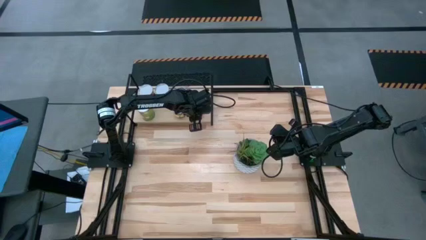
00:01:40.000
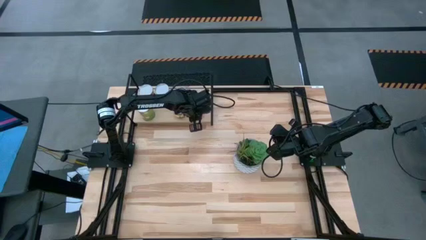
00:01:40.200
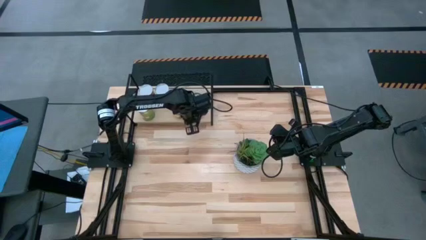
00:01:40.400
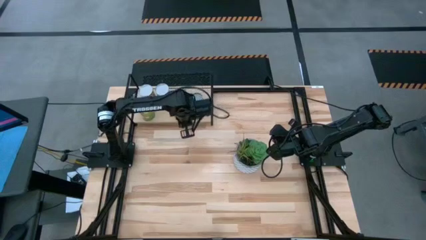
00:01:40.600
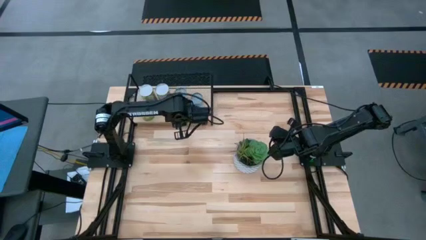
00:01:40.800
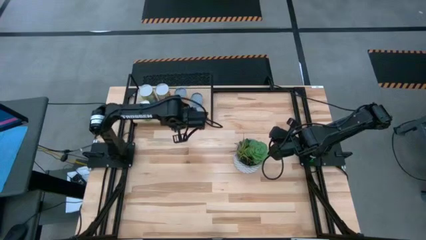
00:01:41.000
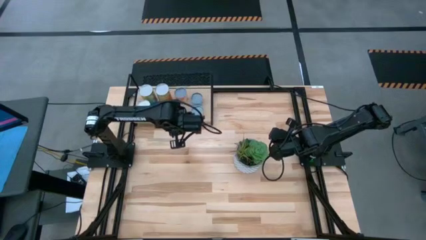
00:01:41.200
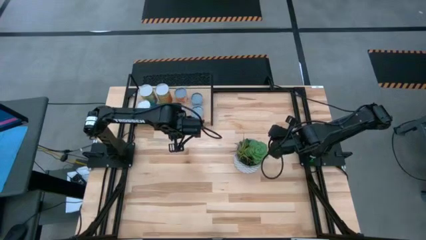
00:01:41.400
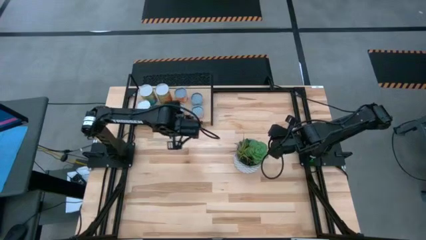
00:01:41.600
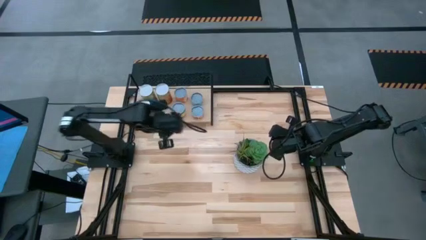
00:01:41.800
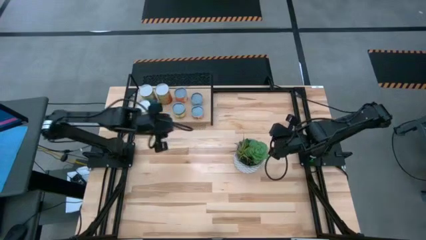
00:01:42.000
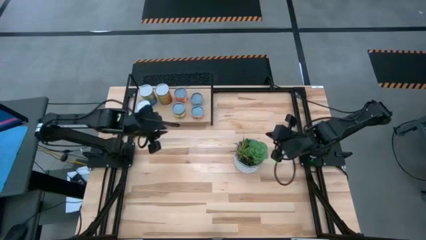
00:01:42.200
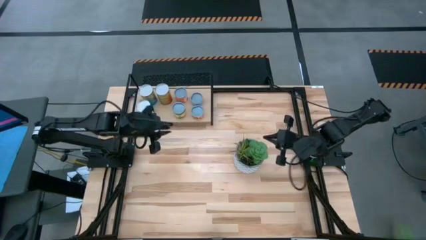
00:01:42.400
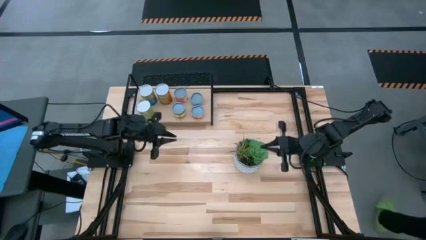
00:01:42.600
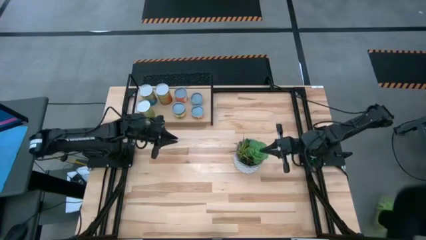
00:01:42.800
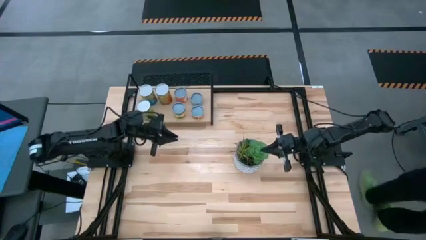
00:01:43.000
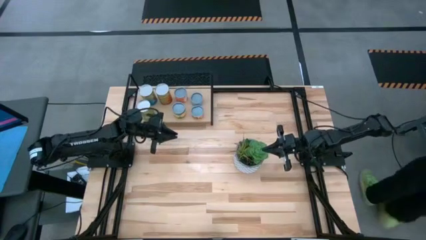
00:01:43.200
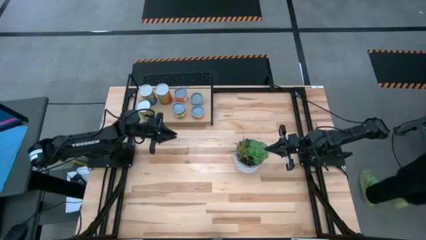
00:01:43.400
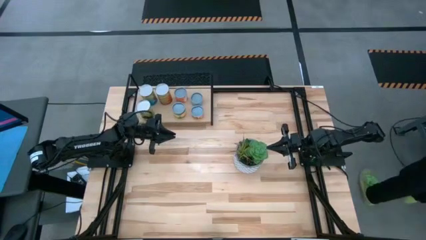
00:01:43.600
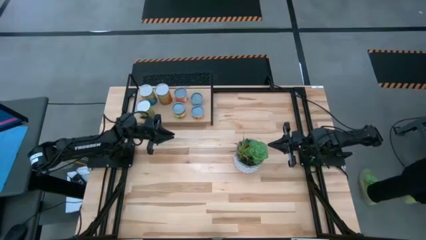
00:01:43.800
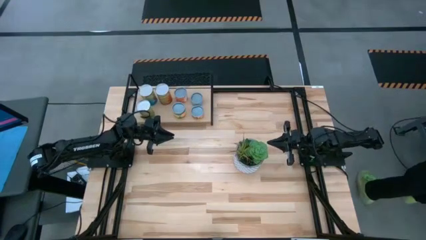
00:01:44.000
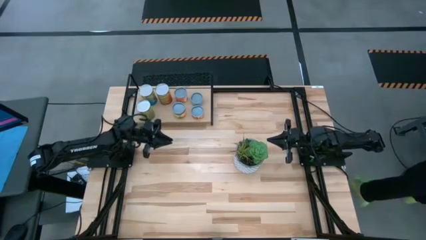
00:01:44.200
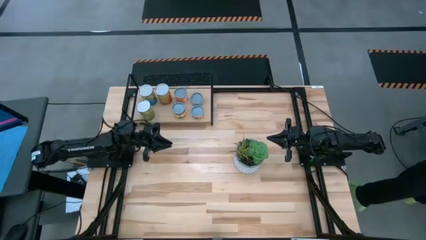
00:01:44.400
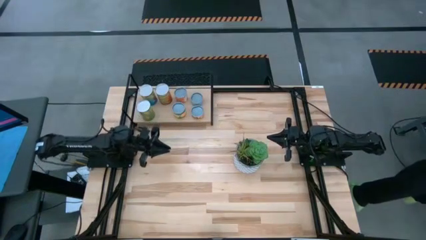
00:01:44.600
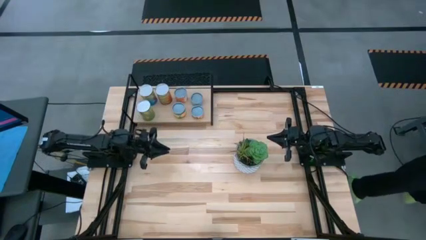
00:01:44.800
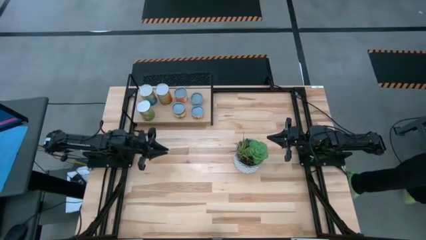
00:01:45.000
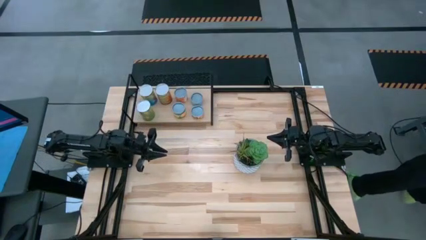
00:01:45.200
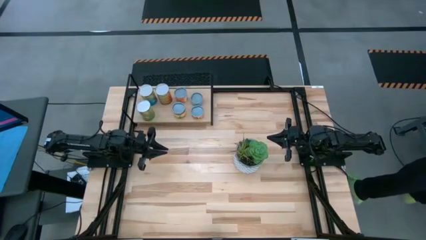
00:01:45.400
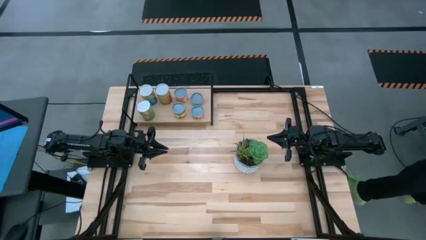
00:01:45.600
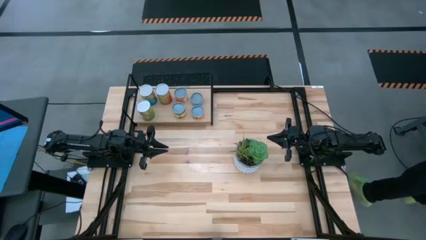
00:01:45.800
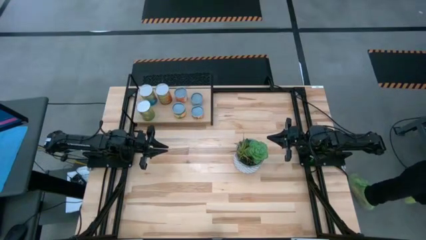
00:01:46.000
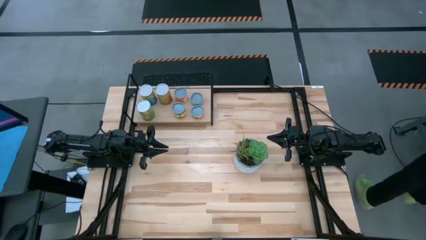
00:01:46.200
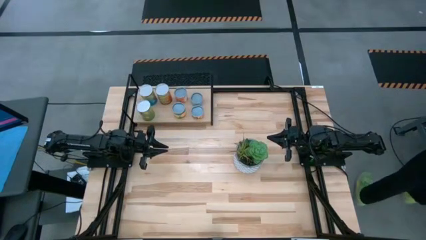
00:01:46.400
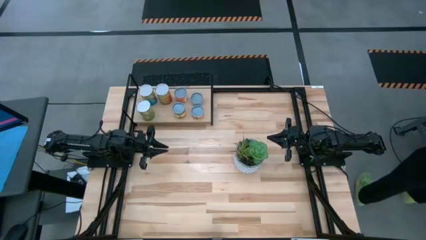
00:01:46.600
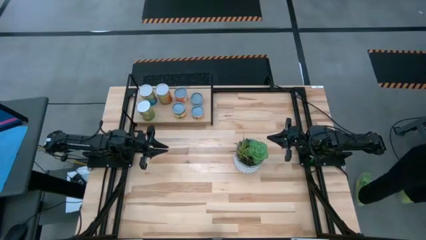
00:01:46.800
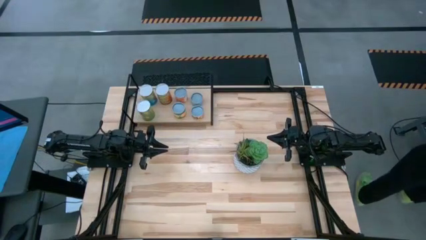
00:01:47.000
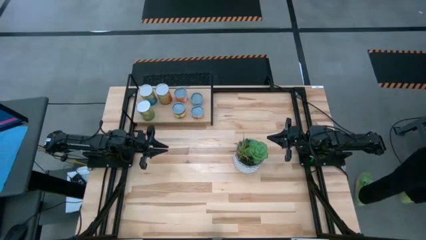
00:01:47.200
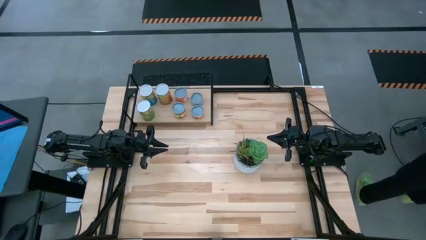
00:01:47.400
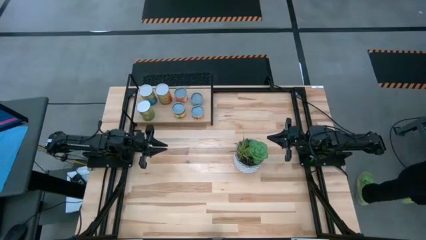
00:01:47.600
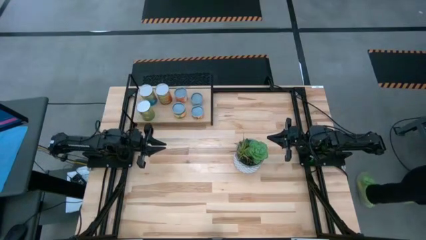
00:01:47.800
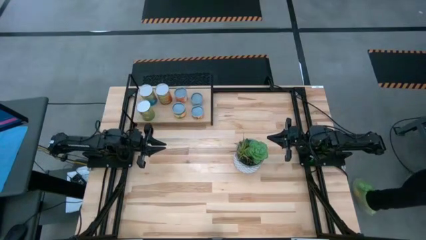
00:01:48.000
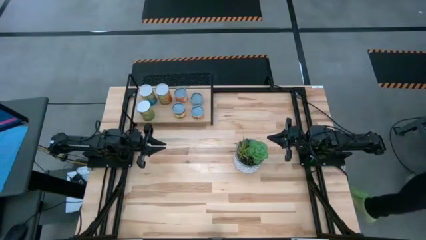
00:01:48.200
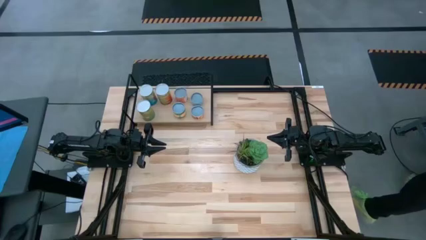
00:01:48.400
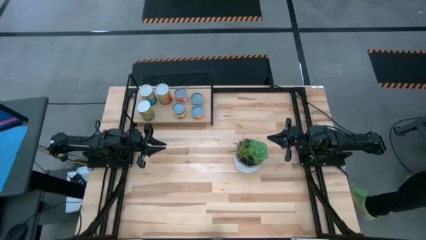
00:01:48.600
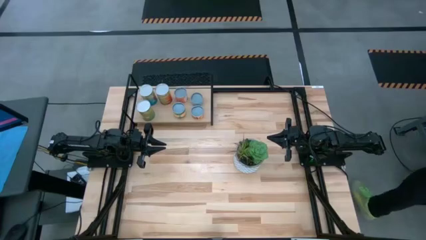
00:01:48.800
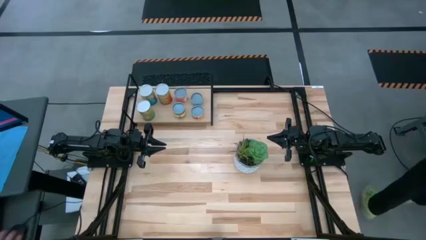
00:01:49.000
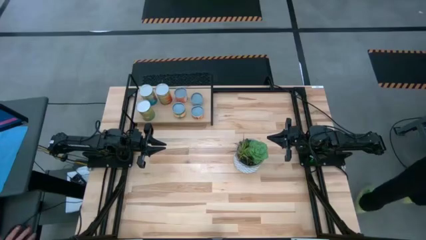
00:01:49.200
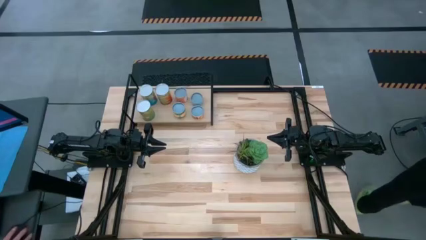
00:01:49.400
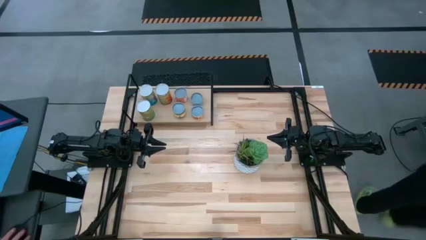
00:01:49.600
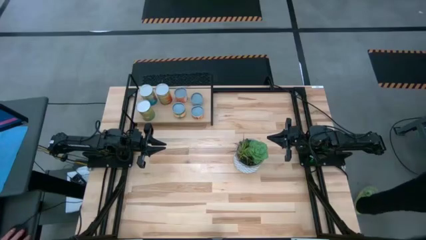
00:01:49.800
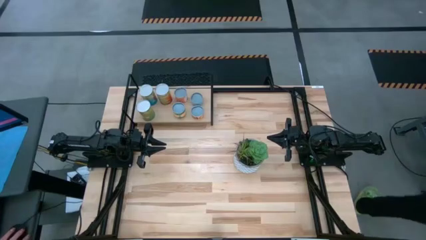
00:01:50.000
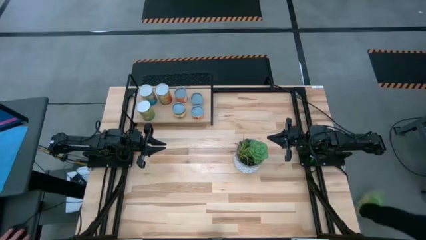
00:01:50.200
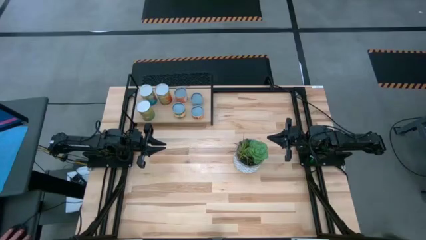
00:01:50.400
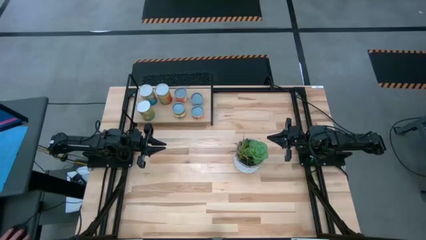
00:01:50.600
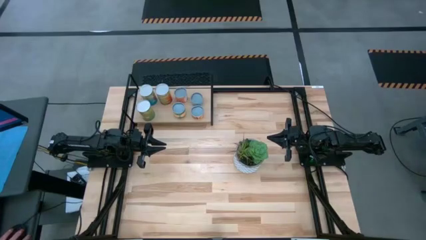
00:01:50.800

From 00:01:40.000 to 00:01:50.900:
Task: Pick and place cans onto a shelf
Return to Home Position

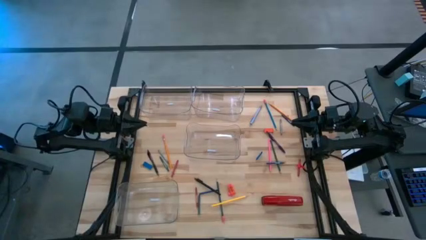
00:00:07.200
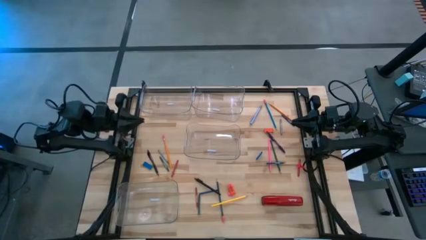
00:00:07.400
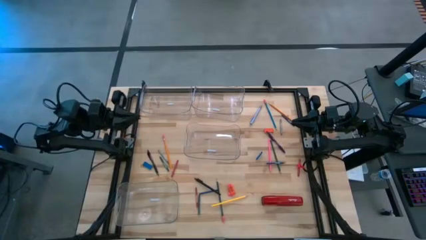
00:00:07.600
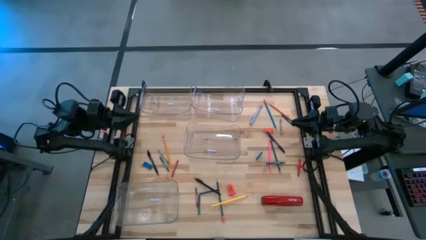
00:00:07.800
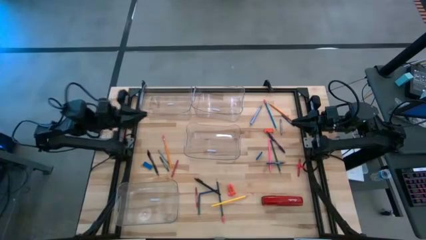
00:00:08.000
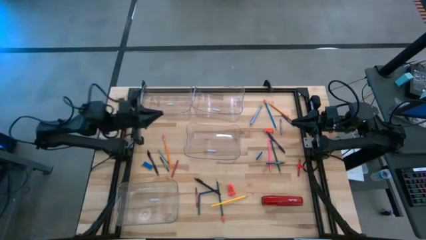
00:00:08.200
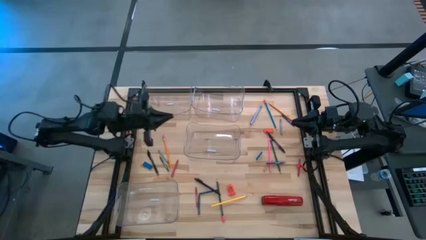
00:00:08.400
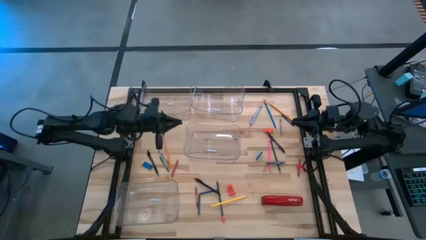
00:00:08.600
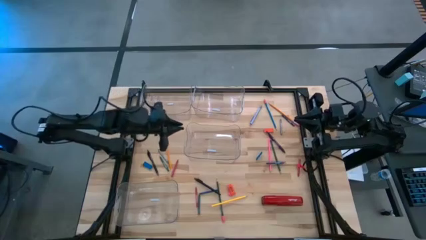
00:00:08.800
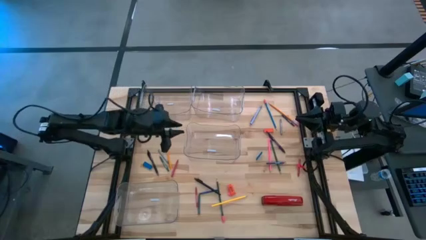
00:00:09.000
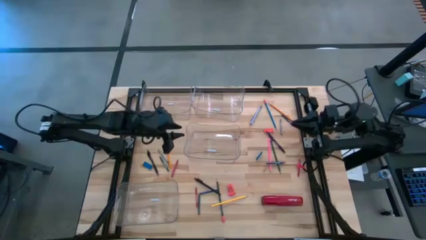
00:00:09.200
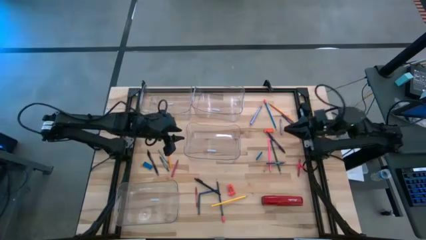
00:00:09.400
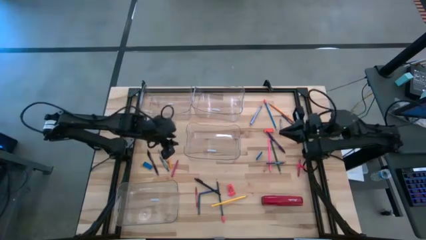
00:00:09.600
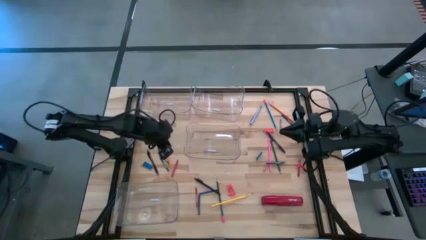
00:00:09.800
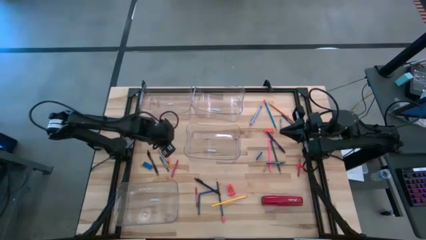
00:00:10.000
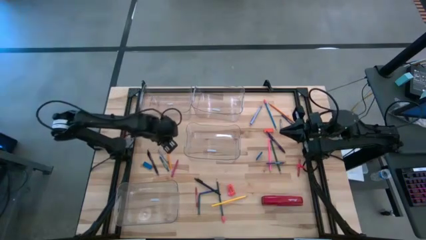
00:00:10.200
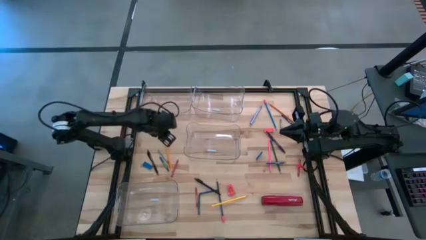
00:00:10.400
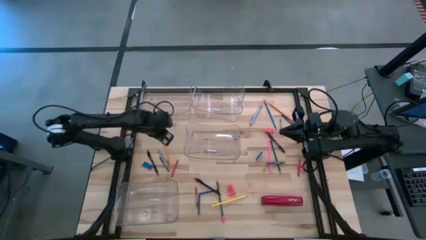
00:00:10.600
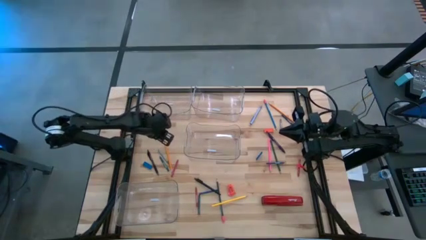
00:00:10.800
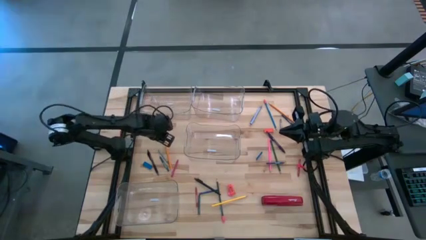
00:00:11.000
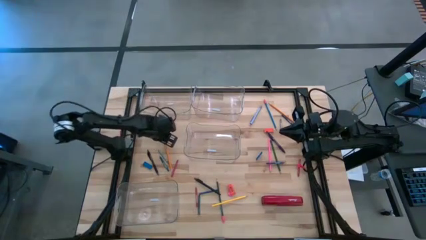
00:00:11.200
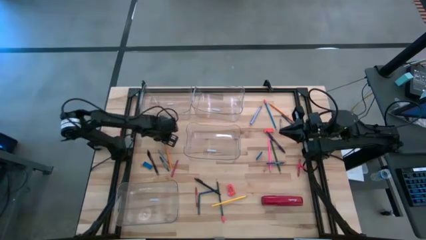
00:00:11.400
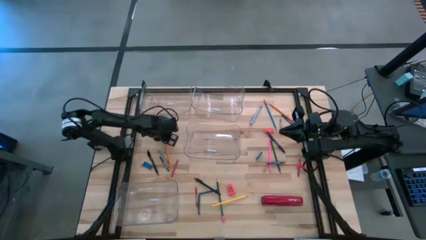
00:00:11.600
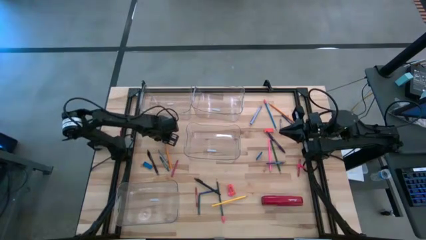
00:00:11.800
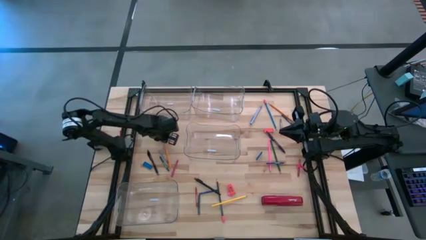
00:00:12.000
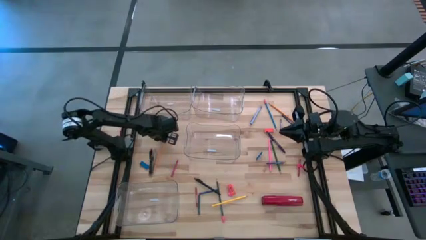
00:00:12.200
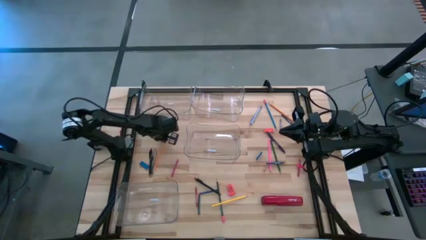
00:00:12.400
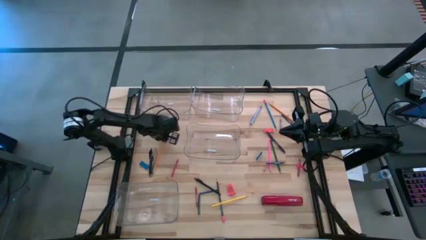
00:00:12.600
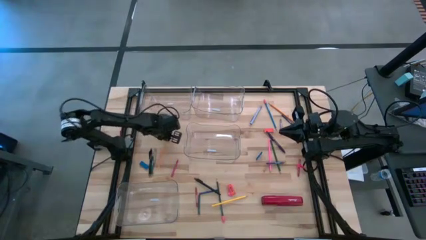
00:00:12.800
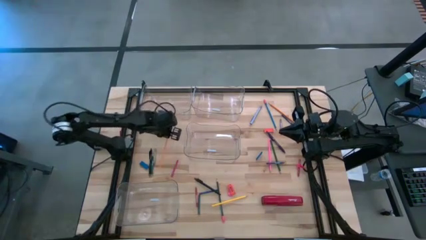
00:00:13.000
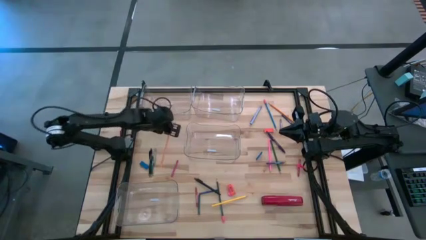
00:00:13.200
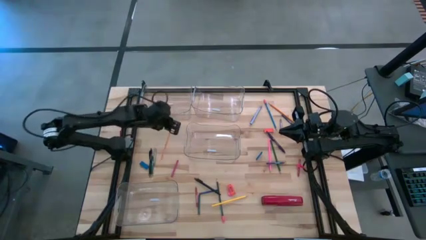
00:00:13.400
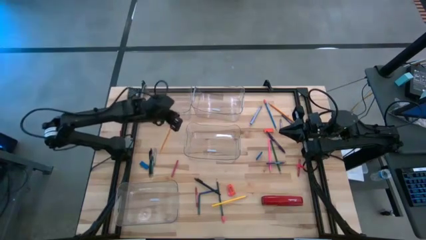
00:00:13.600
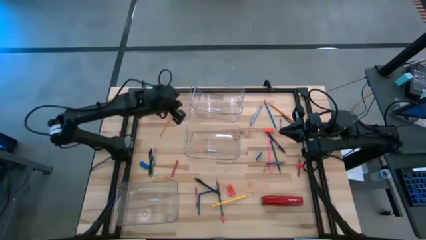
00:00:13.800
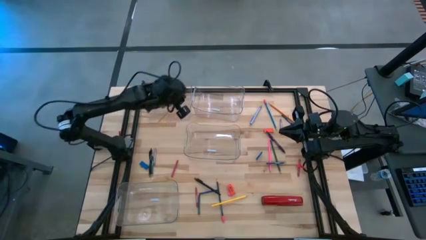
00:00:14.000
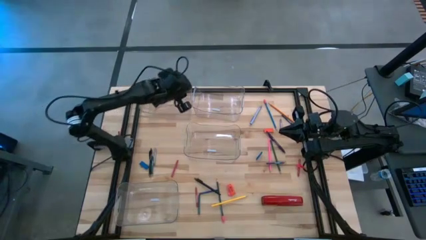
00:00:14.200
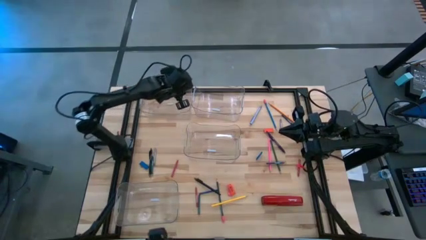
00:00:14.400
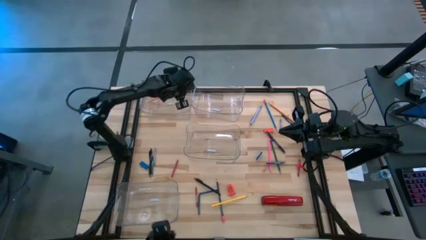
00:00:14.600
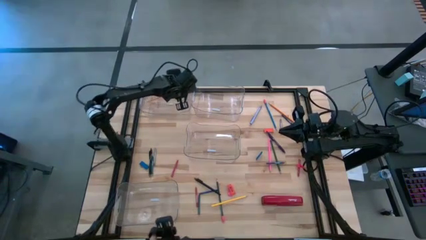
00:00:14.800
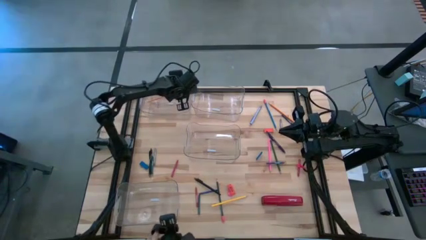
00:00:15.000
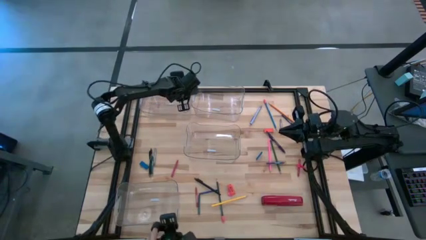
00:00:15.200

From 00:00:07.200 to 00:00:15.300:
Task: Sort crayons/erasers/pens/pencils in bins
Put the bottom orange pencil into the top left transparent bin
